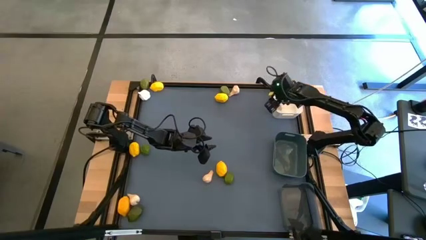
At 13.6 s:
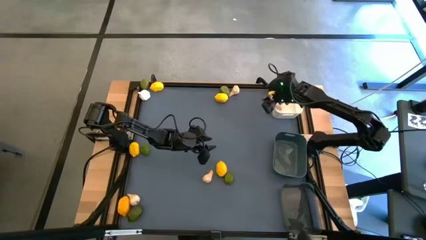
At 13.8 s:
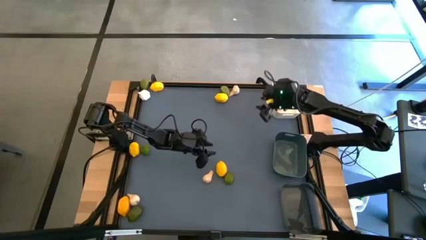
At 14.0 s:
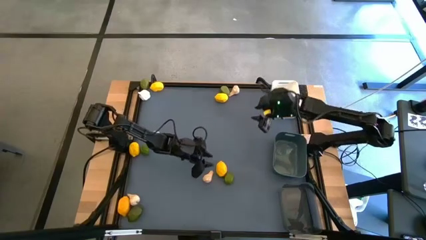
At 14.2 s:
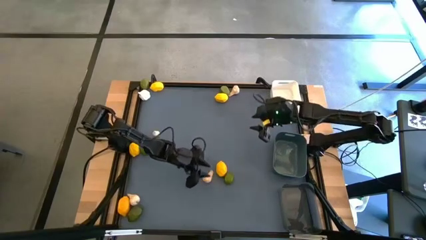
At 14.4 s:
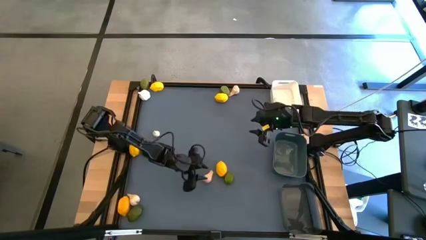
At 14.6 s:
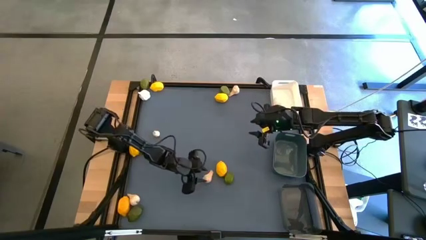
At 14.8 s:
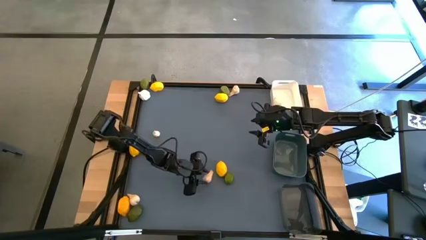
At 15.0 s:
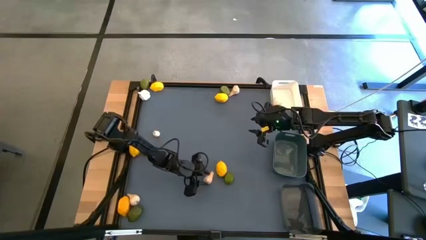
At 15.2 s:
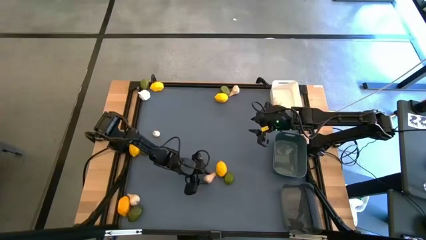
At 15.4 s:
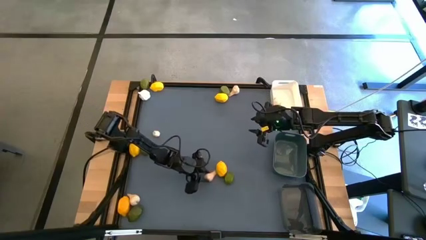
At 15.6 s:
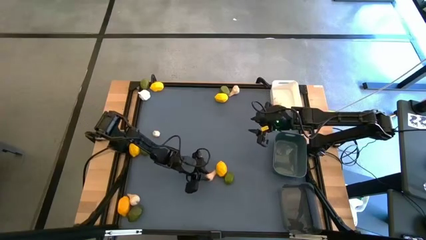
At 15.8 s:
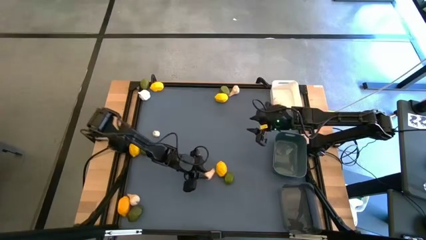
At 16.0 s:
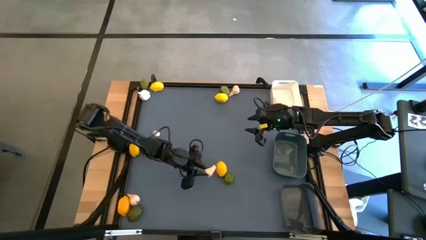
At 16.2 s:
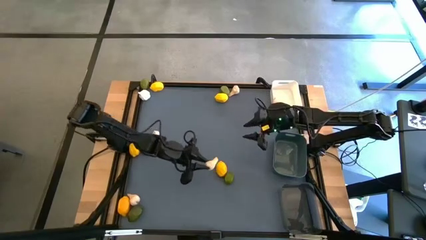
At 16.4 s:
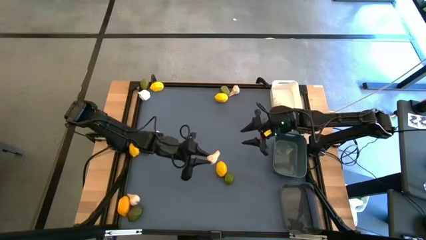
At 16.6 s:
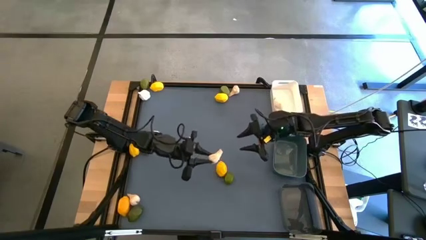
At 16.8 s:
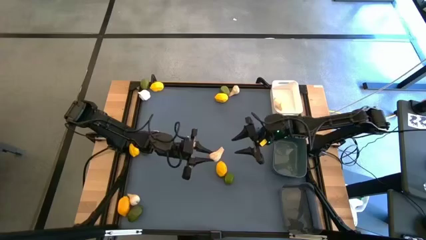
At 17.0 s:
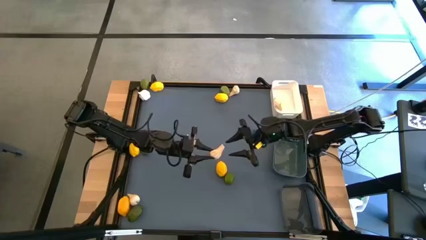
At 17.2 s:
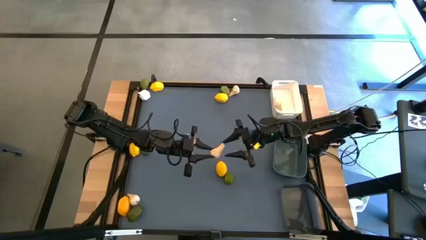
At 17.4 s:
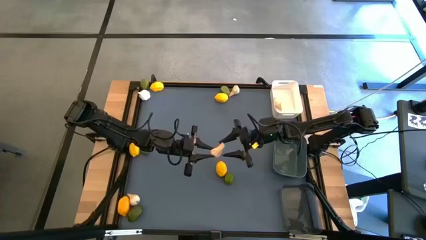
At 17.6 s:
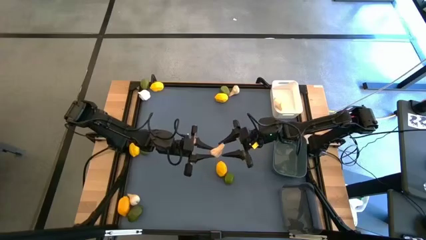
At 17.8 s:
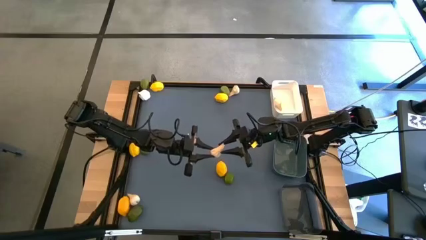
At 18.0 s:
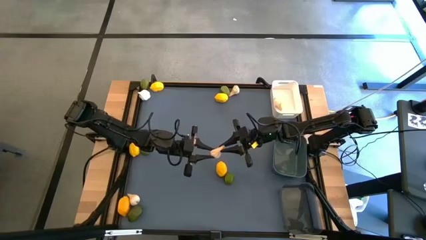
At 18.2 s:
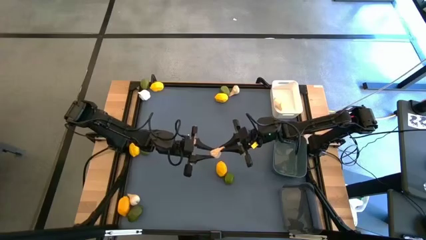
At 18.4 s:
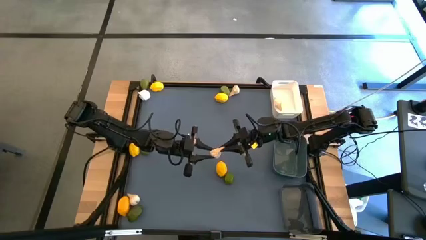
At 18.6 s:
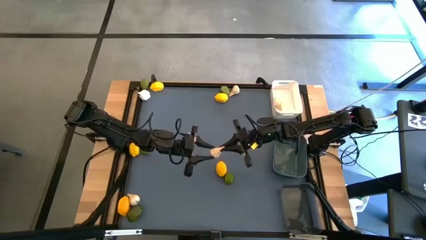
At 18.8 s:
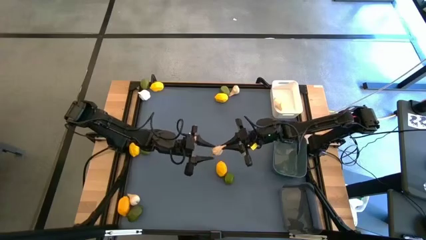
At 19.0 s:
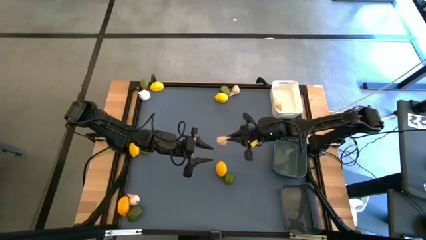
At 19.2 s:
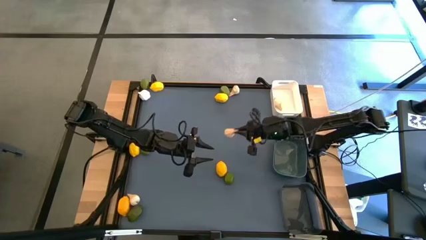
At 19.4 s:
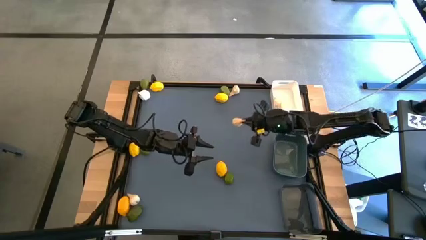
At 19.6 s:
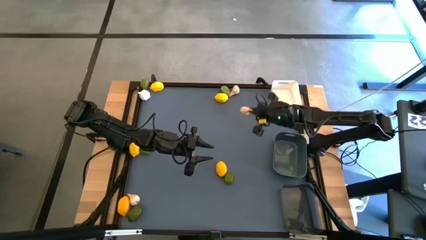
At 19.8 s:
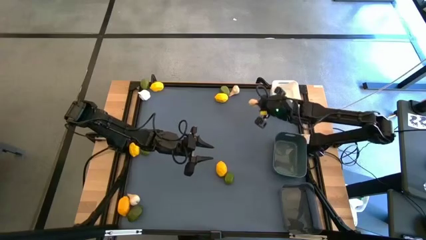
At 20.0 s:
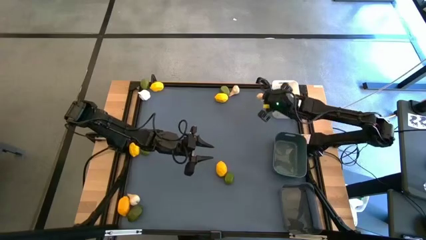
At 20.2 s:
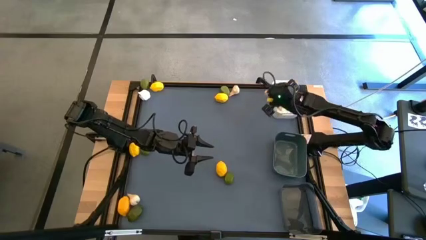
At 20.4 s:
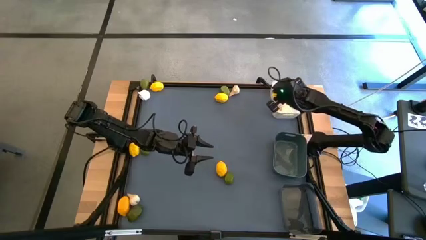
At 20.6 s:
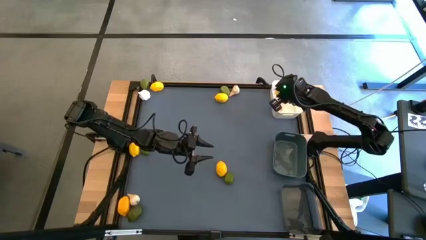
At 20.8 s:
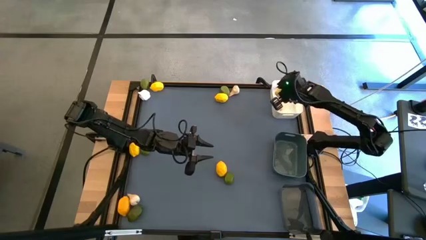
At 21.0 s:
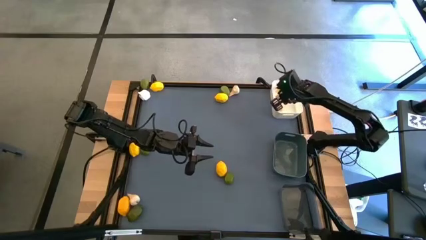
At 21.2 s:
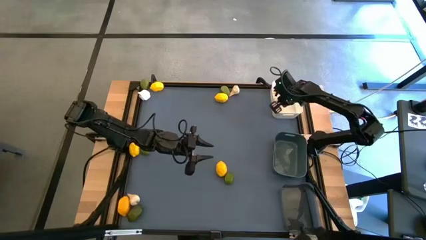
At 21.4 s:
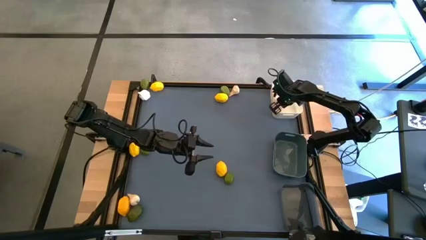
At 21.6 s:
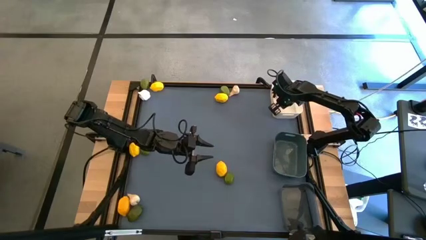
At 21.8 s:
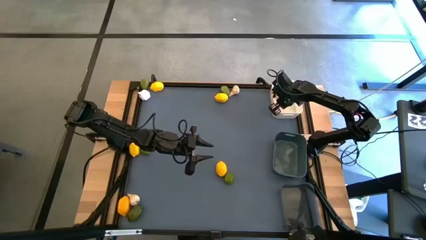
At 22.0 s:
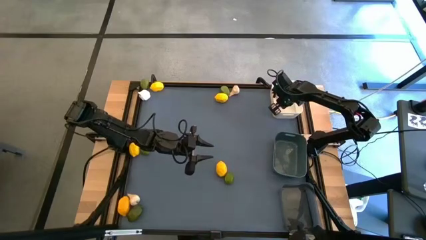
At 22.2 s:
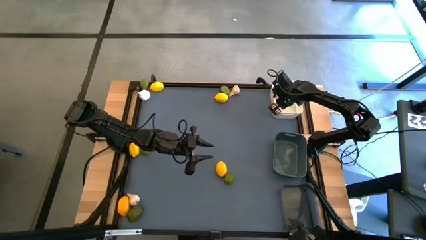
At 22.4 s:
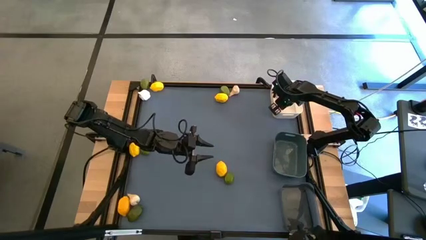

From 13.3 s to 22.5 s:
Task: Sort produce into baskets
Put the white garlic into the white bin

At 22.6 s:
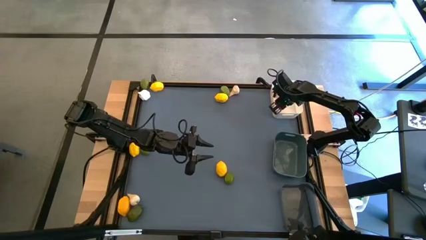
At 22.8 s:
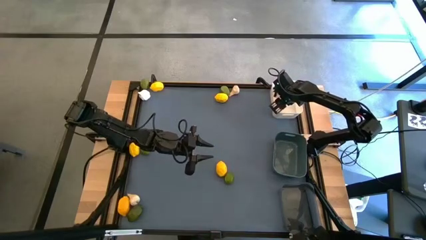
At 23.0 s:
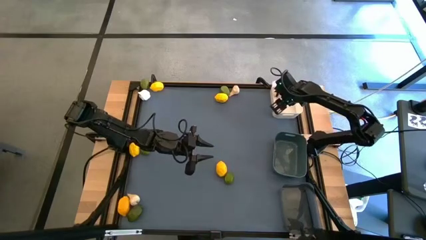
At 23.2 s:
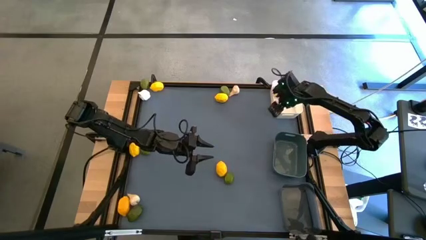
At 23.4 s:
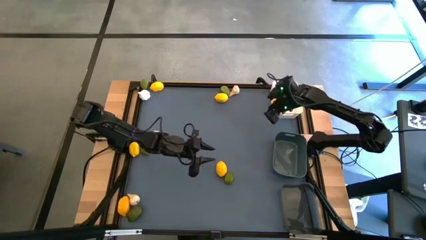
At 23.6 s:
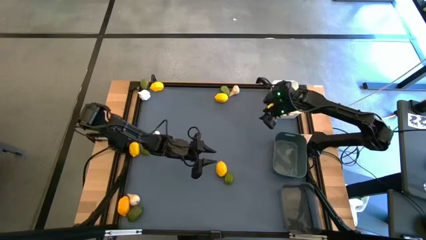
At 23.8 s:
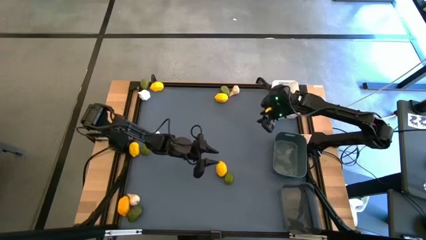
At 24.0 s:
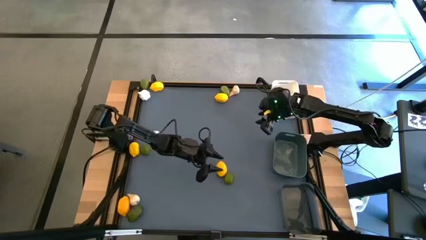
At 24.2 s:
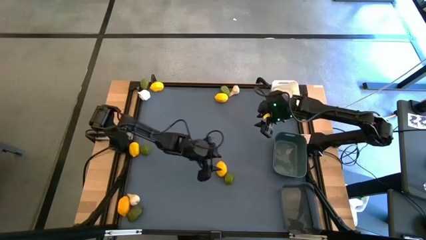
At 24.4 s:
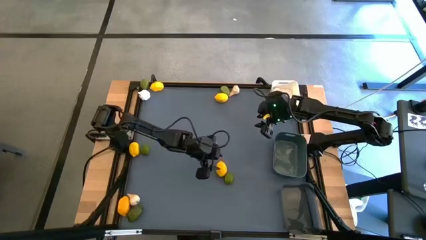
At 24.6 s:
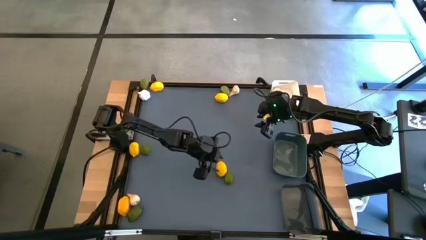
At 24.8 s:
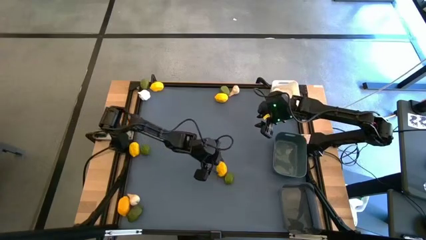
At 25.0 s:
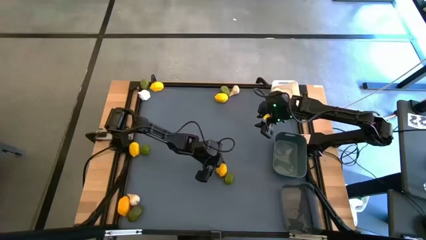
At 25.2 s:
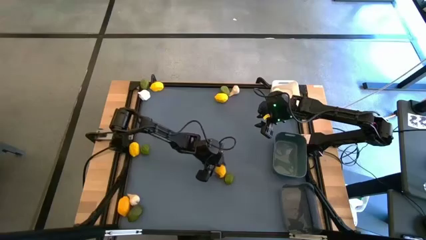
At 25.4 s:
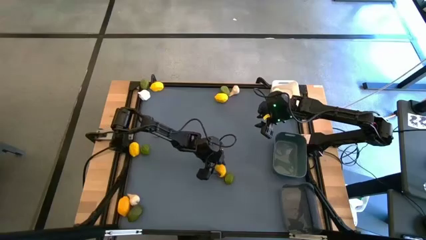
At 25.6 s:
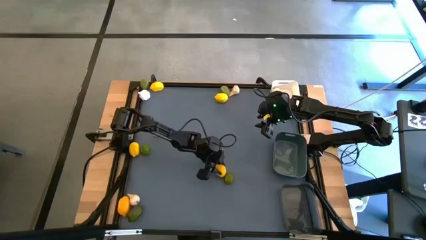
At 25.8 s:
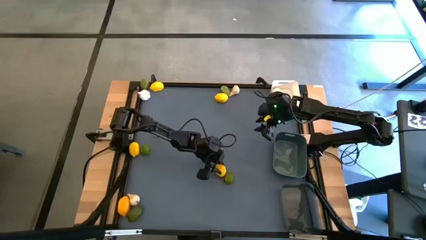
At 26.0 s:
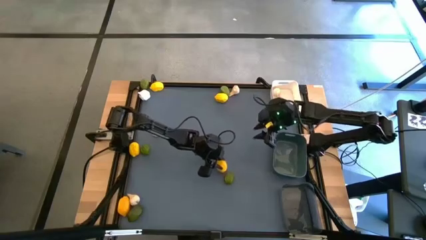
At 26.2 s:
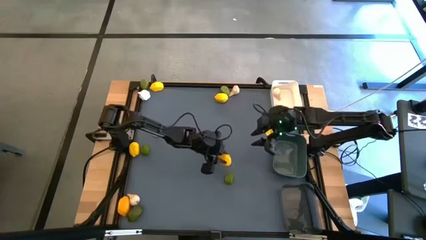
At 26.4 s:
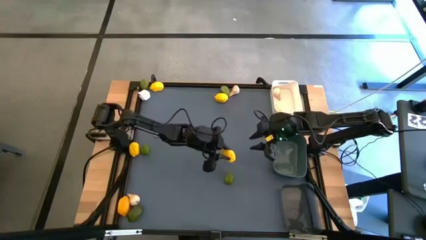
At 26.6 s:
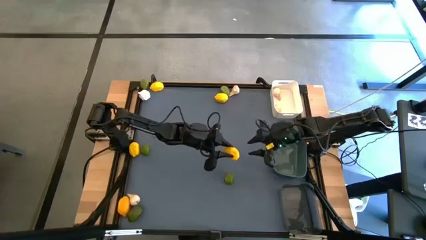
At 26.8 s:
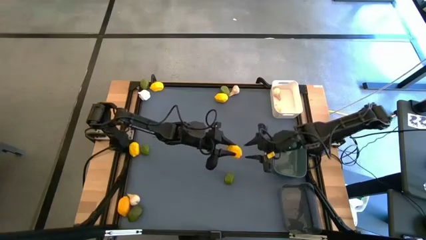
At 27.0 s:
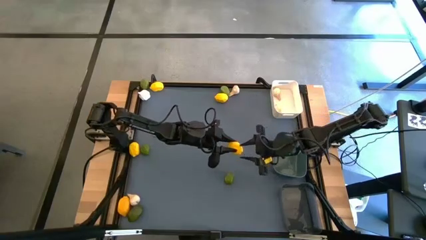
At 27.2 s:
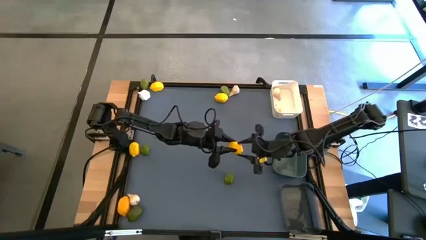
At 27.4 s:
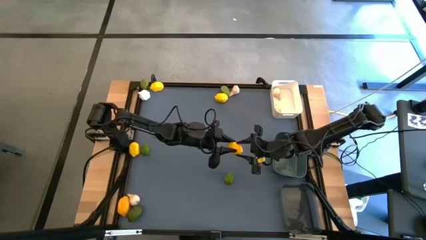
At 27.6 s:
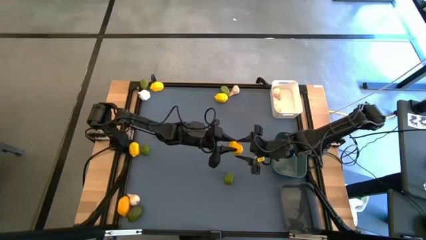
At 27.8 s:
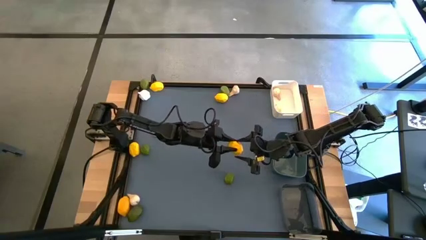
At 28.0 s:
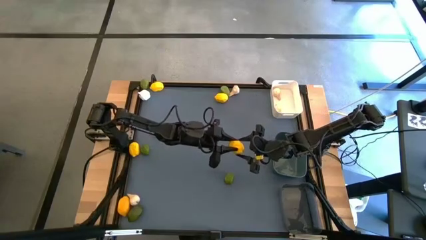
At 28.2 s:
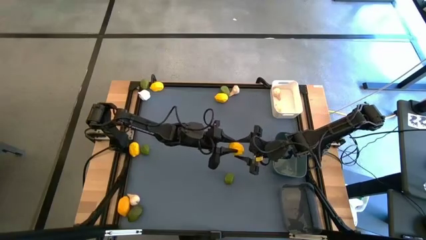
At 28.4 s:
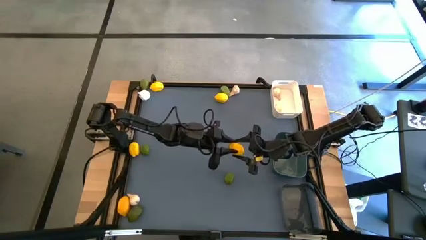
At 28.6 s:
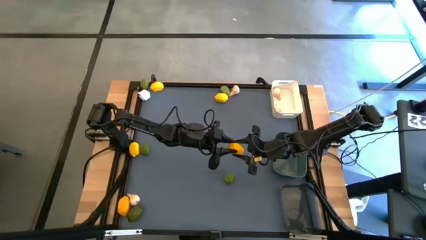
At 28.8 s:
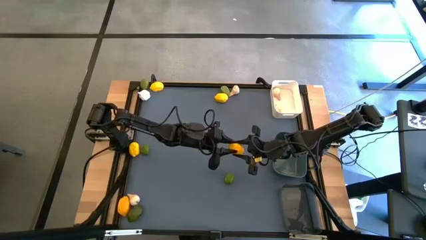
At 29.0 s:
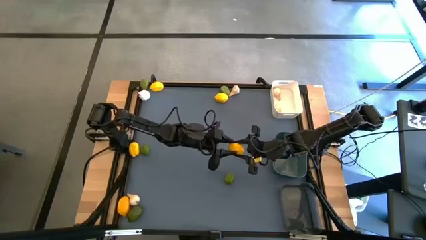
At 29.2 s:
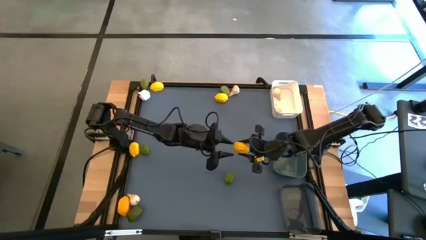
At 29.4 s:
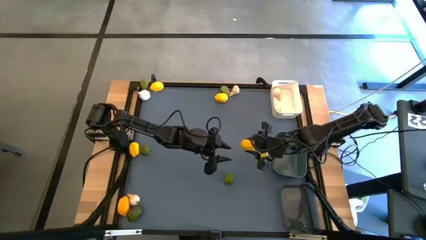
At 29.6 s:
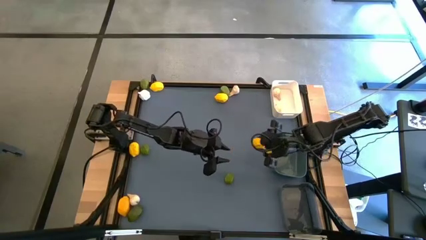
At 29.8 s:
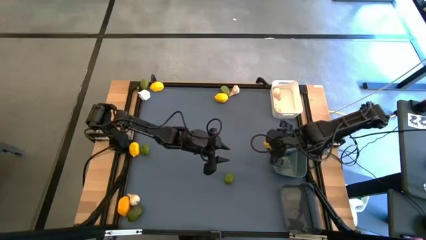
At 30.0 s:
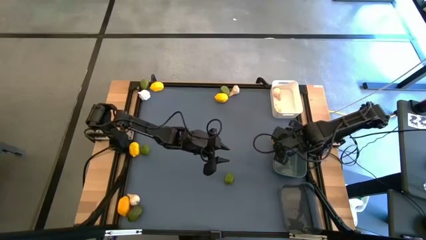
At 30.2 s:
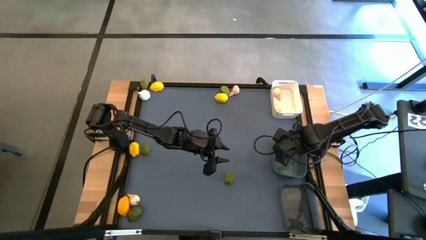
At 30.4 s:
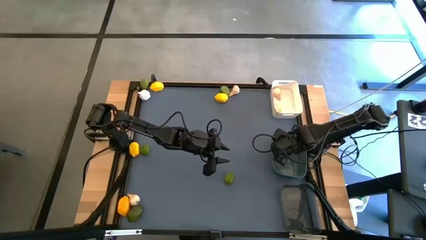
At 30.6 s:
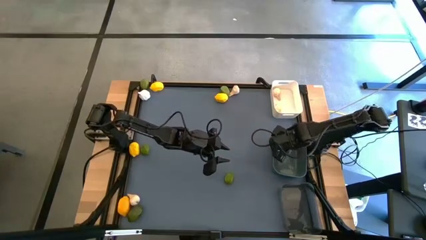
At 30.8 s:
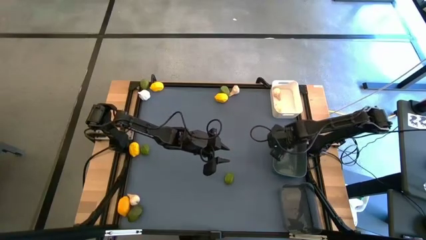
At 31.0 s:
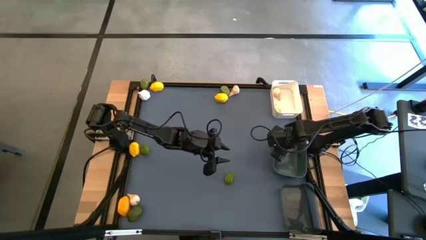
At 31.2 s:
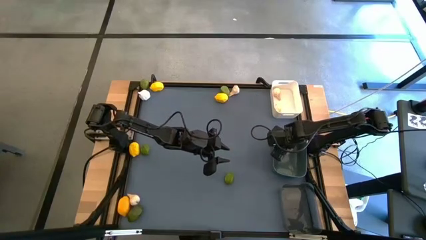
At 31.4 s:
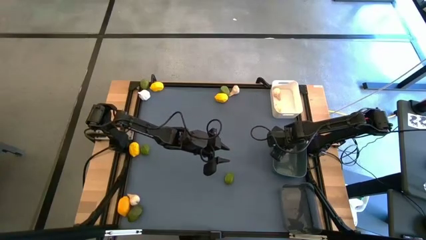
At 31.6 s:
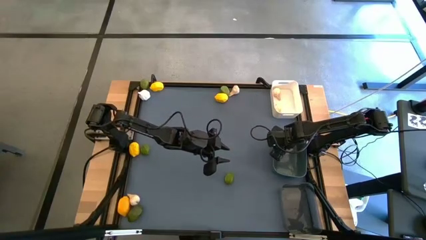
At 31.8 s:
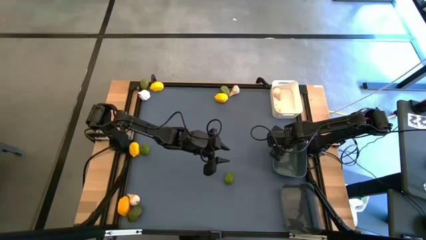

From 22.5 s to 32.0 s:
Put the yellow lemon into the gray bin
